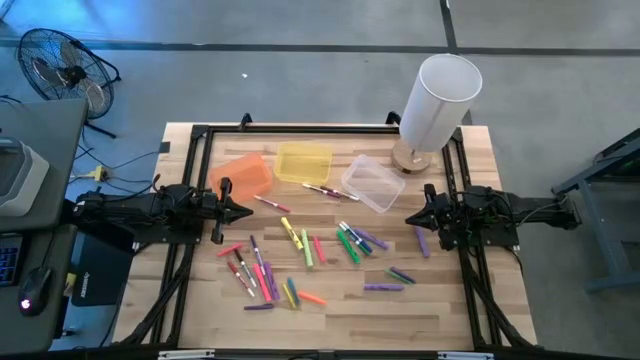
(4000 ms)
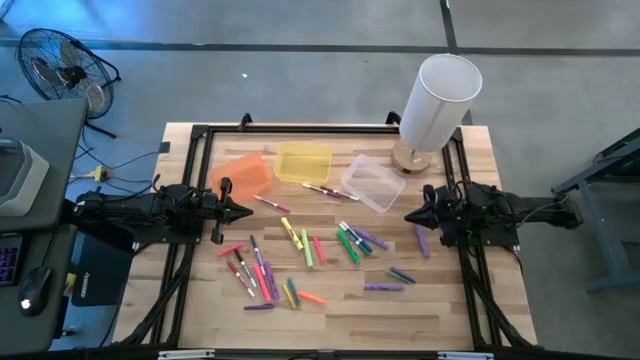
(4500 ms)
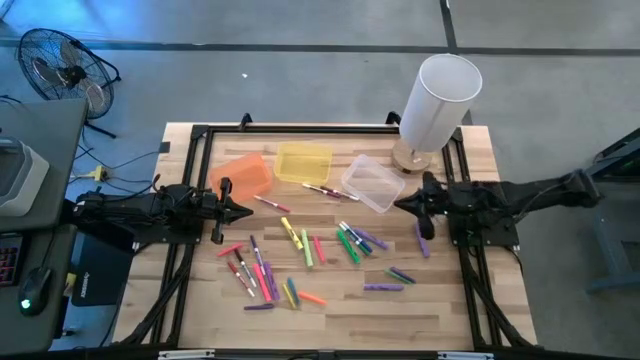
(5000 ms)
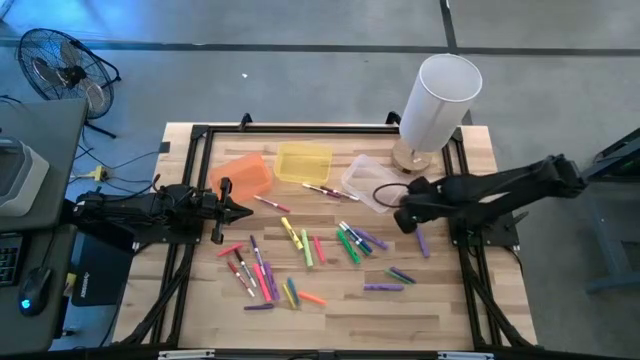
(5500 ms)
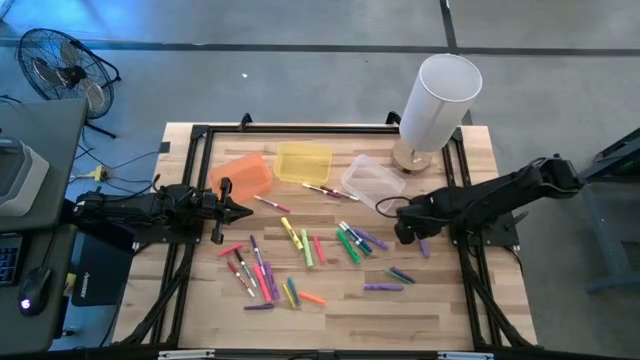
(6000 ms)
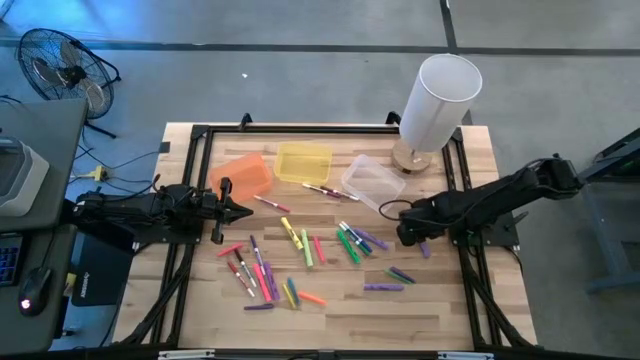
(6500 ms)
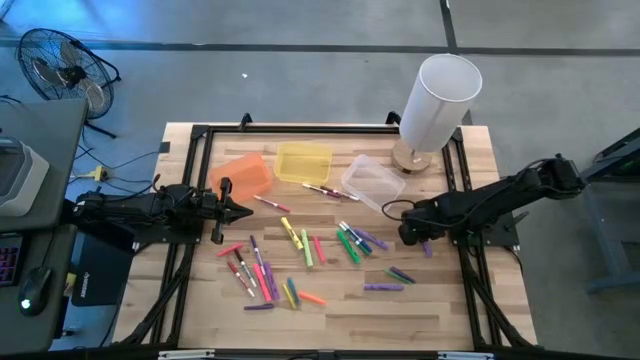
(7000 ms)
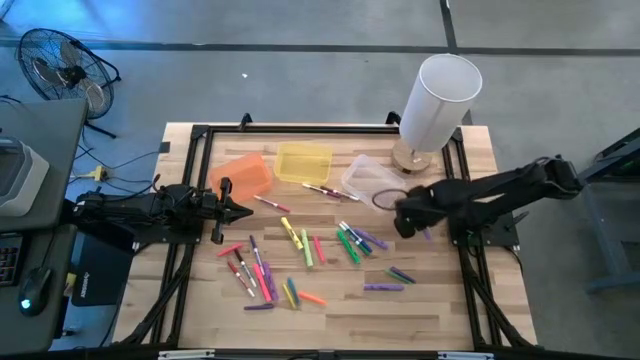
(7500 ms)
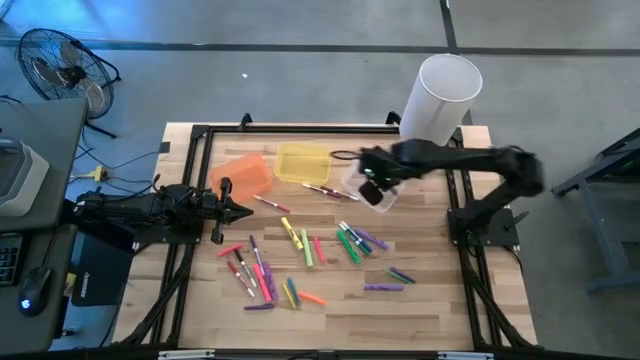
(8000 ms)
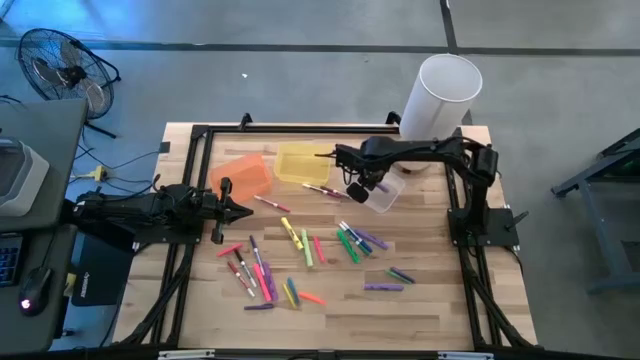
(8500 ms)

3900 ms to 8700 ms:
Task: Pick & Place Markers
Put the top right purple highlighter pen into the white bin

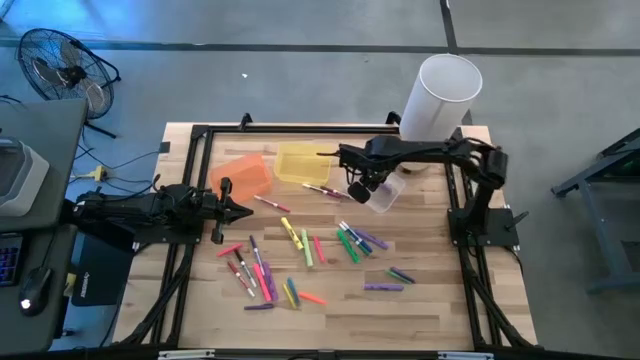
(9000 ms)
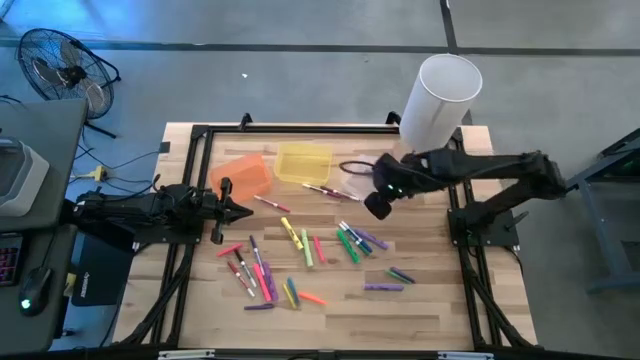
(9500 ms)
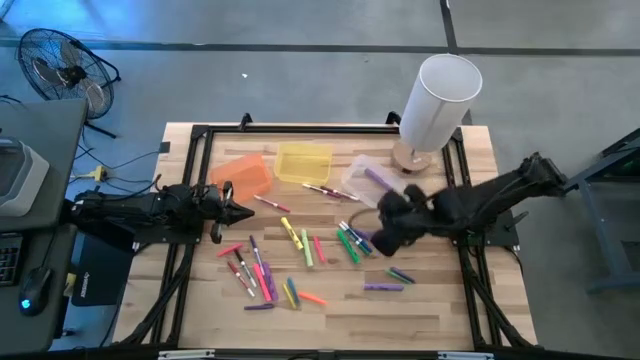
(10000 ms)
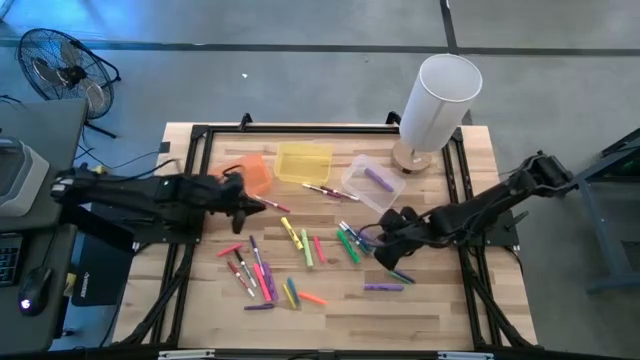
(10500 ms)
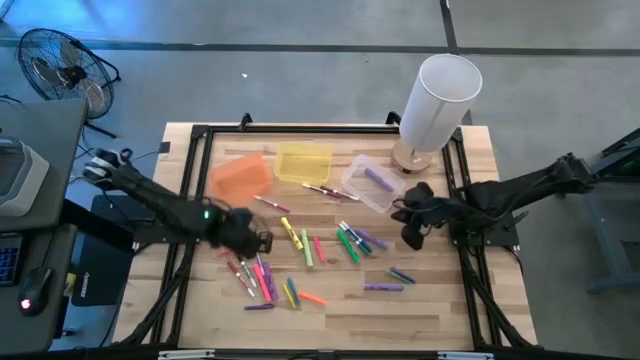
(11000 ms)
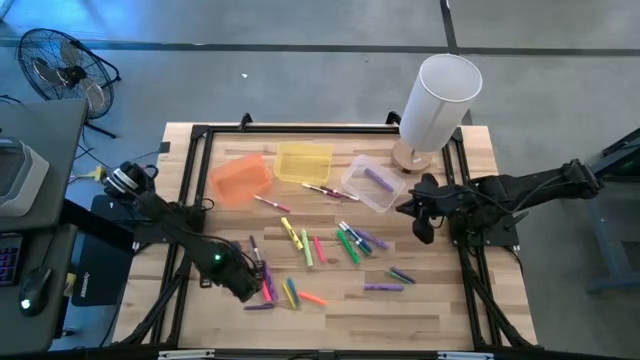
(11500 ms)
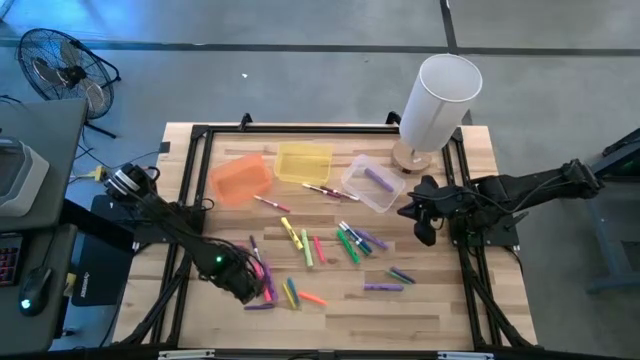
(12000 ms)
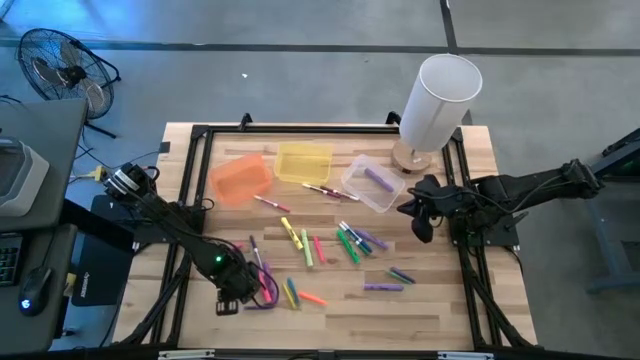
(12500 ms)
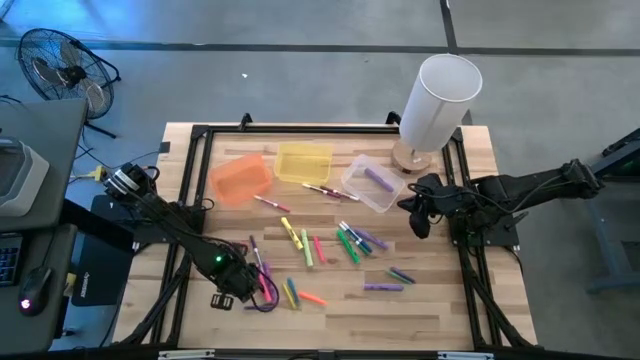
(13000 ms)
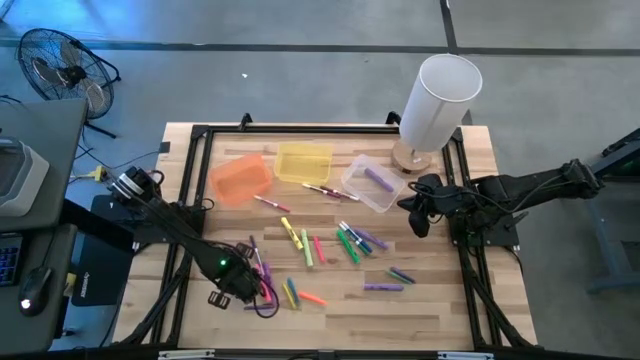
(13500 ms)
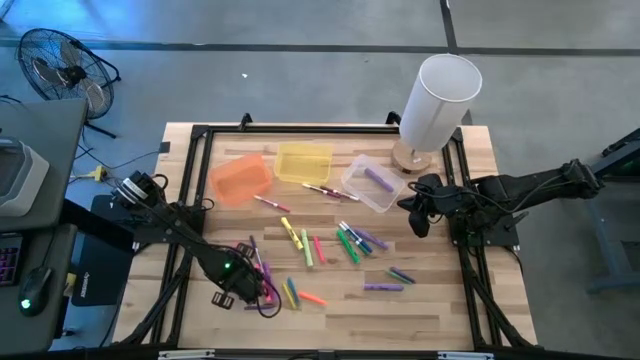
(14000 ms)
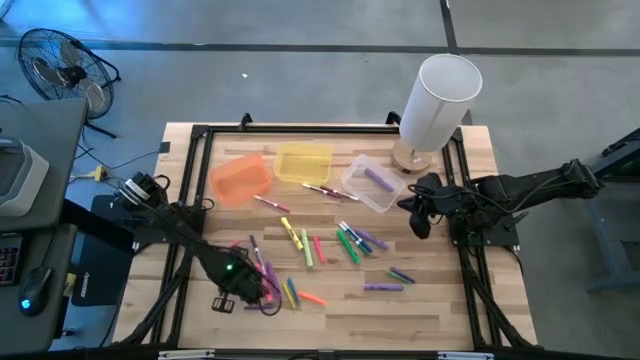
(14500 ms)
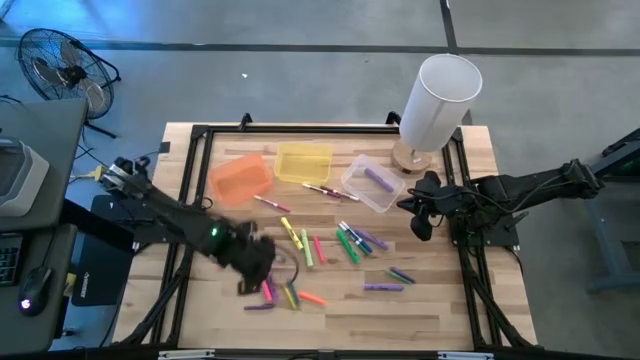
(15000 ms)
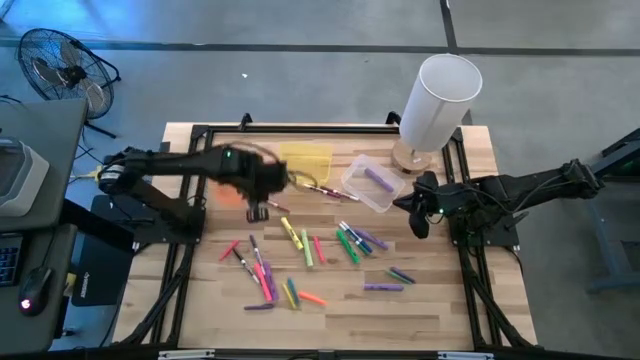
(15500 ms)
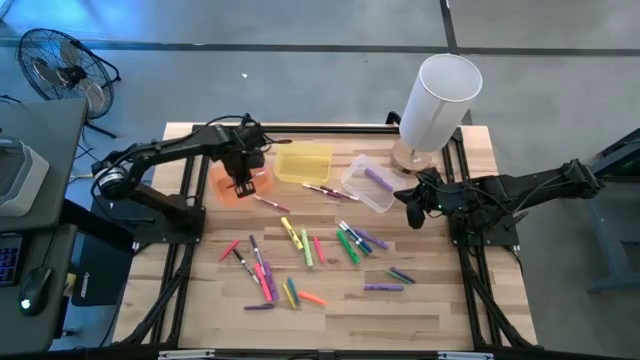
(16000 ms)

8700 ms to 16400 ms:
Put the red marker pen into the orange bin

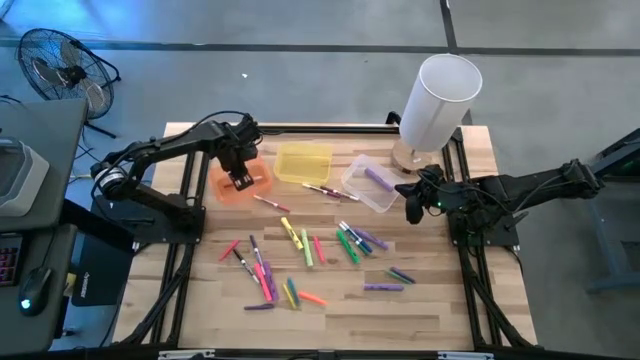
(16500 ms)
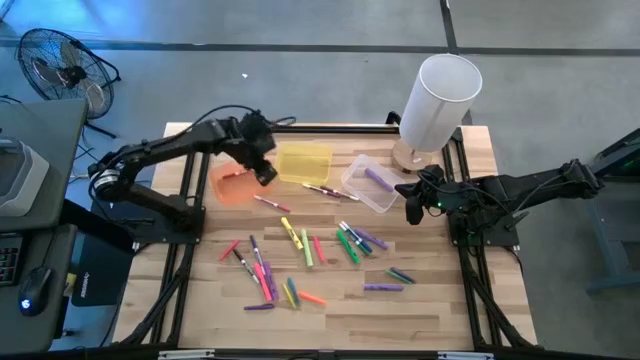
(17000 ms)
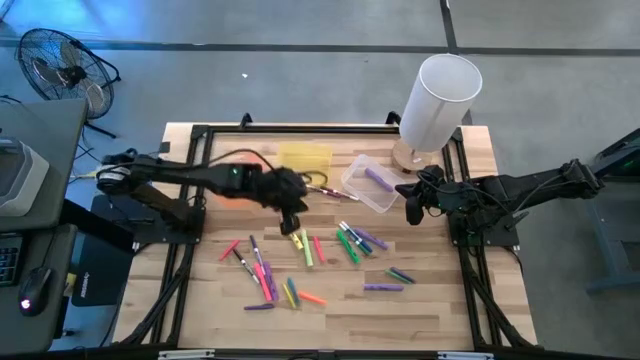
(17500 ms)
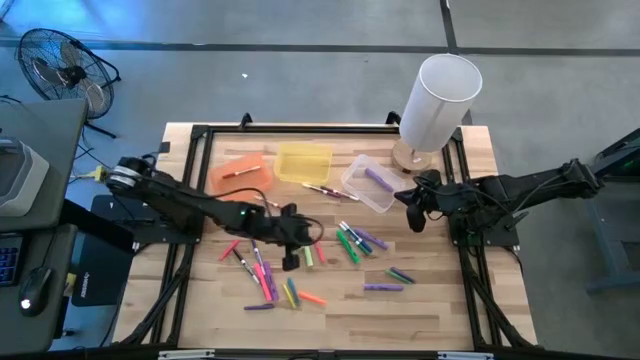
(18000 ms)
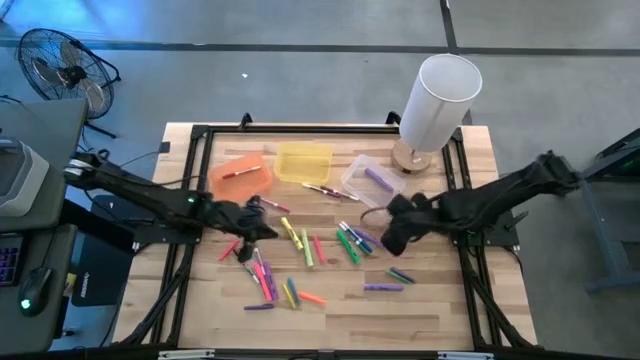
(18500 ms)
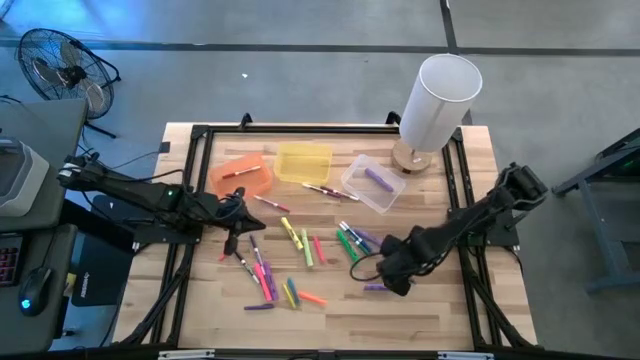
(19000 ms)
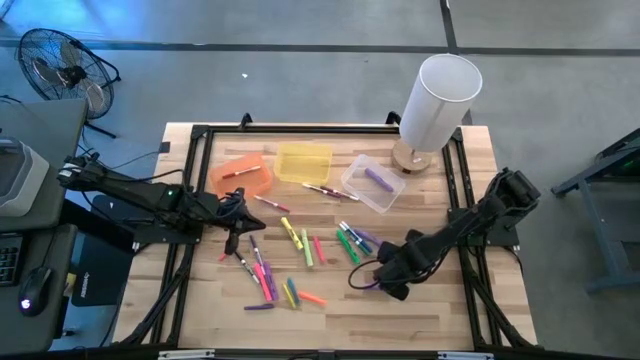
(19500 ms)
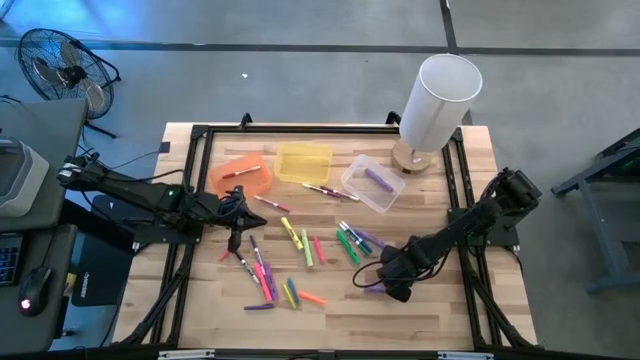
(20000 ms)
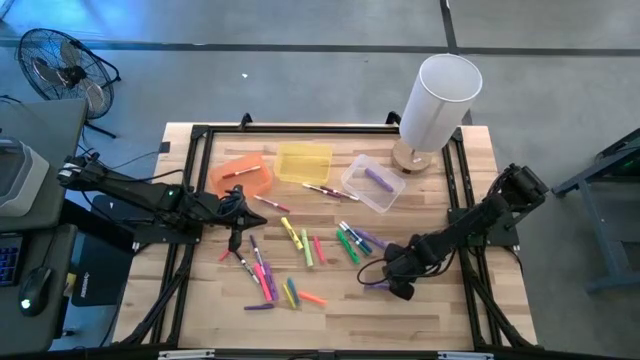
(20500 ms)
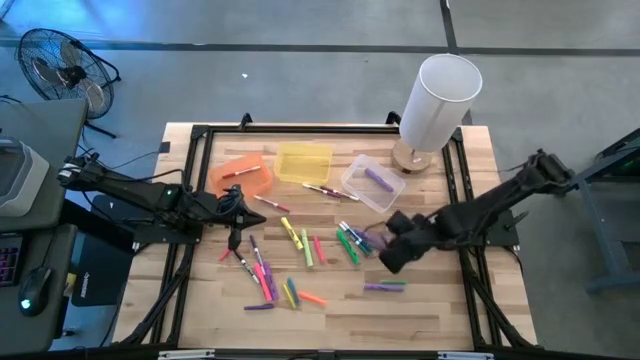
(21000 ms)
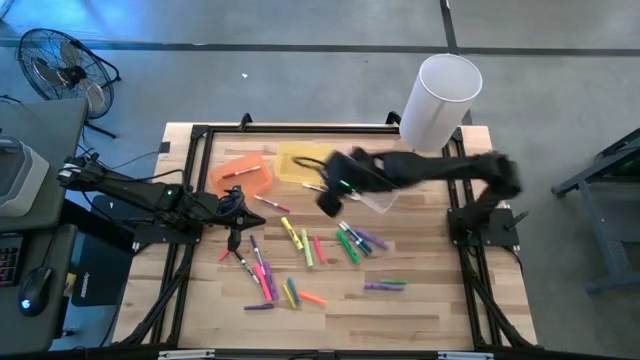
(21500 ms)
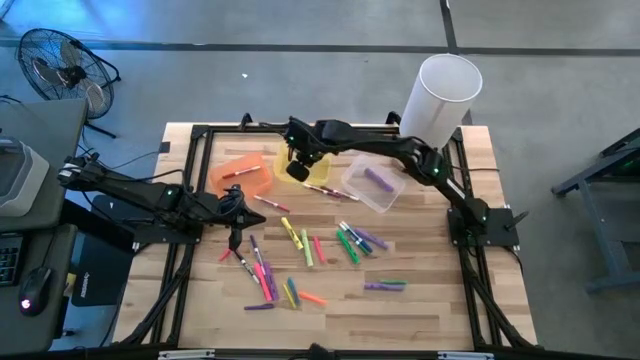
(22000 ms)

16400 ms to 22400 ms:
Put the top purple pen into the yellow bin

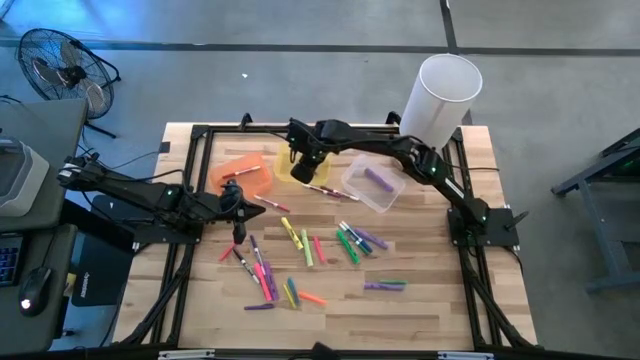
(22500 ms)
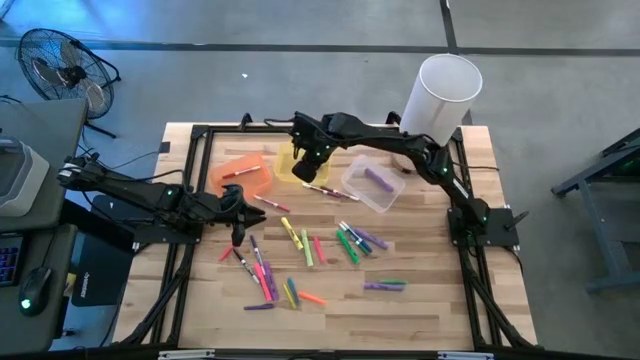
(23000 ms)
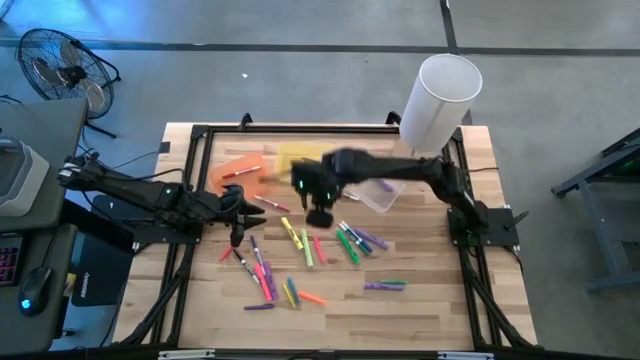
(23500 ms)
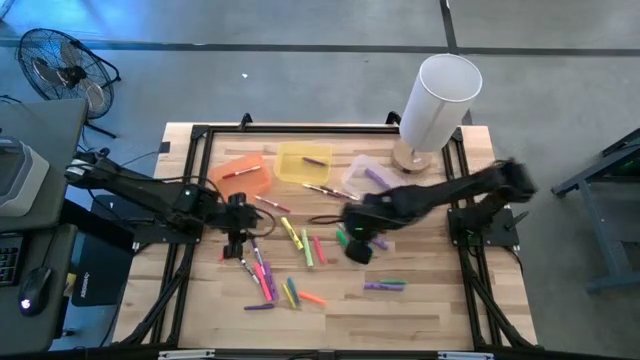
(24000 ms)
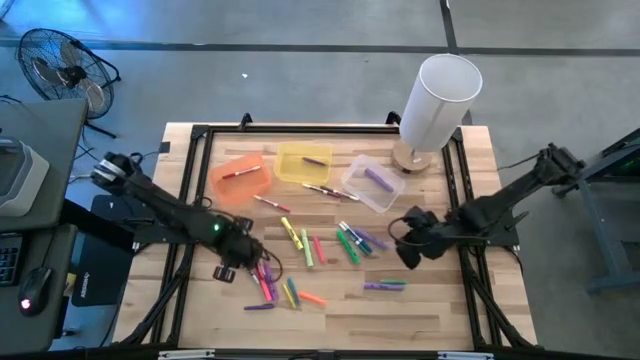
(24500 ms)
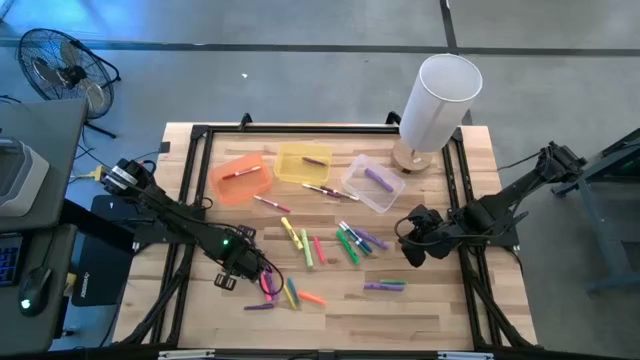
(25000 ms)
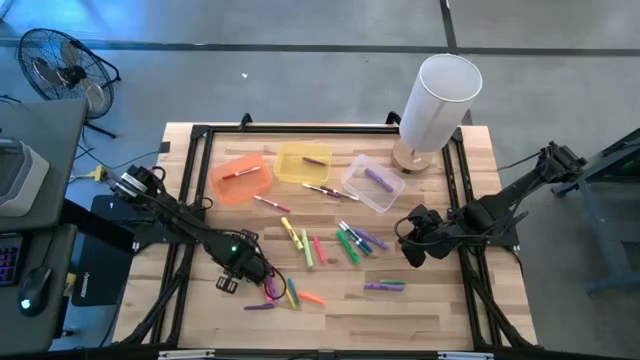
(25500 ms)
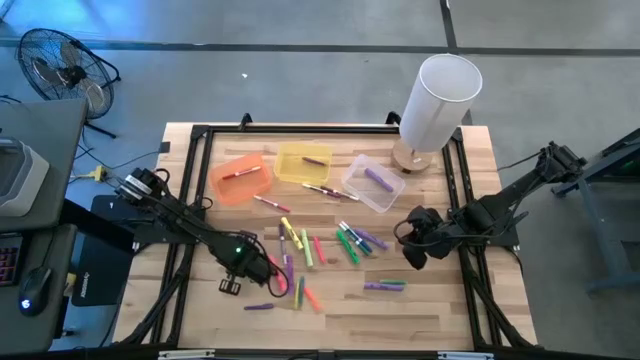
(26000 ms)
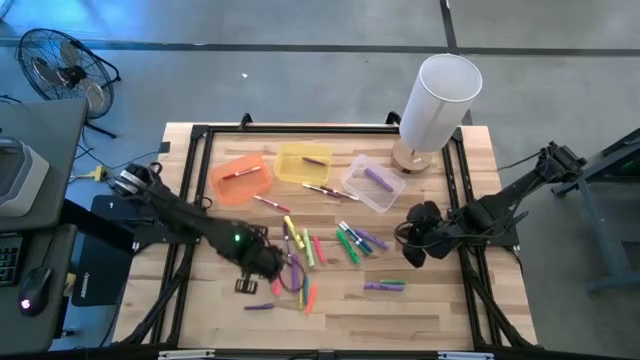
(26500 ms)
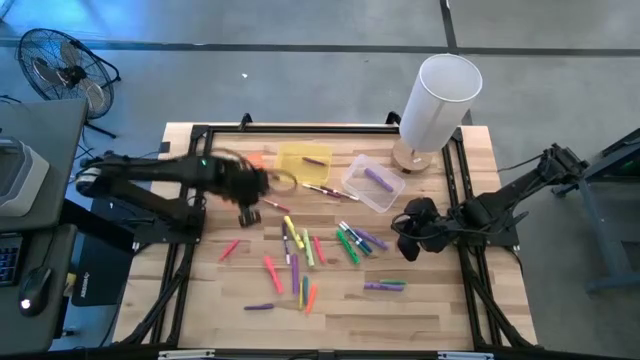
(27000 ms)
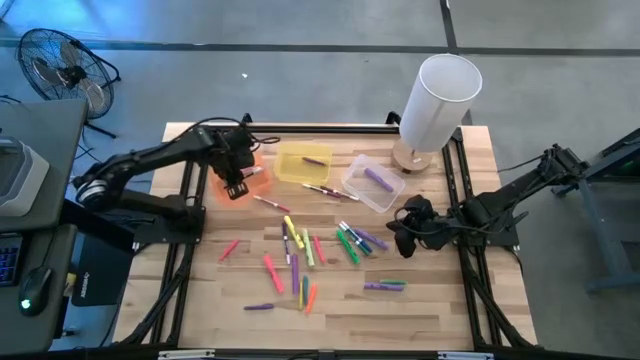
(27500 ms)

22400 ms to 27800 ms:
Put the black marker pen into the orange bin
